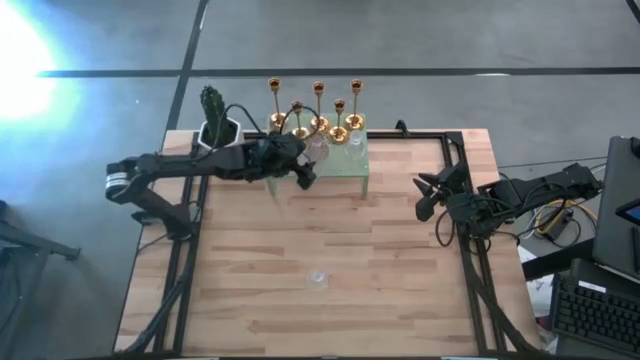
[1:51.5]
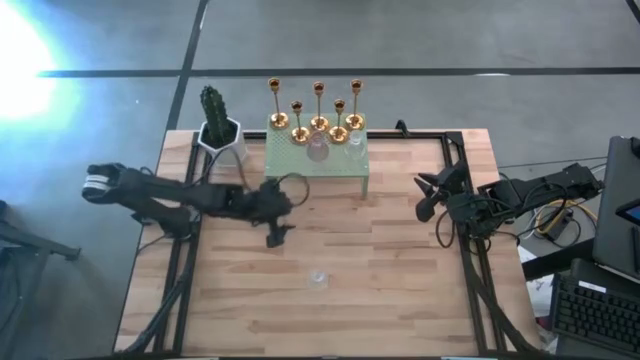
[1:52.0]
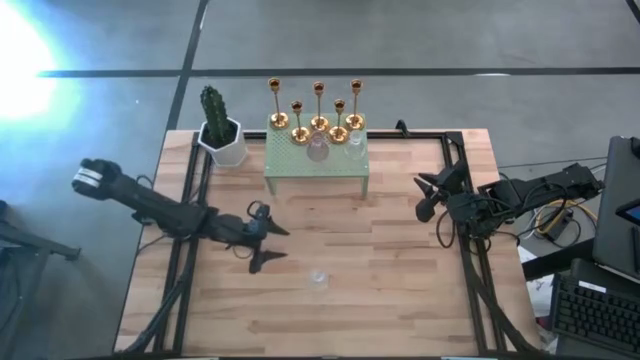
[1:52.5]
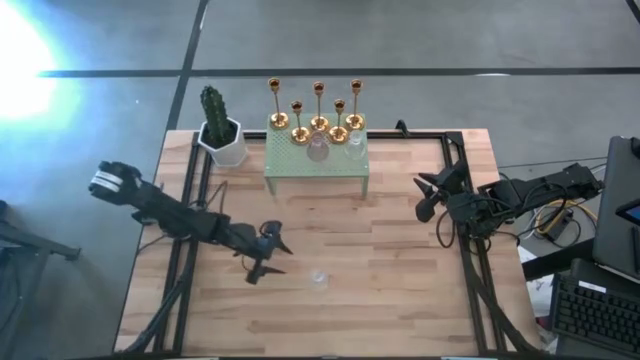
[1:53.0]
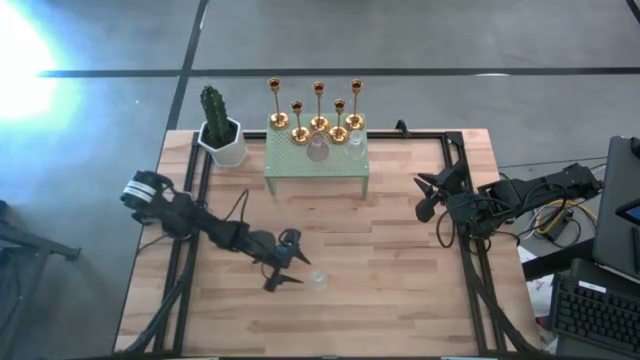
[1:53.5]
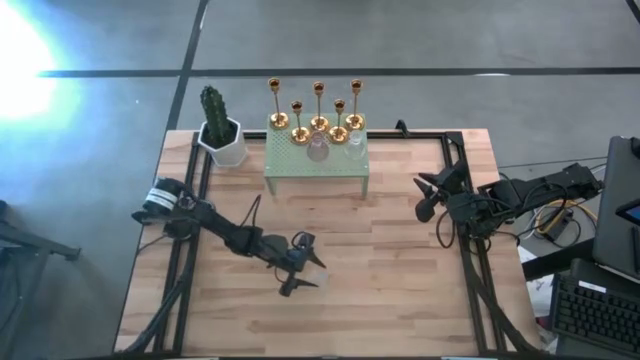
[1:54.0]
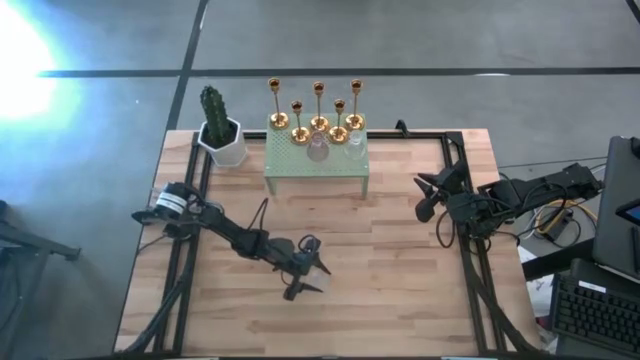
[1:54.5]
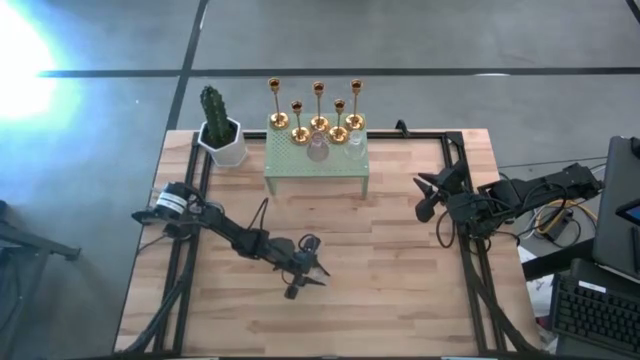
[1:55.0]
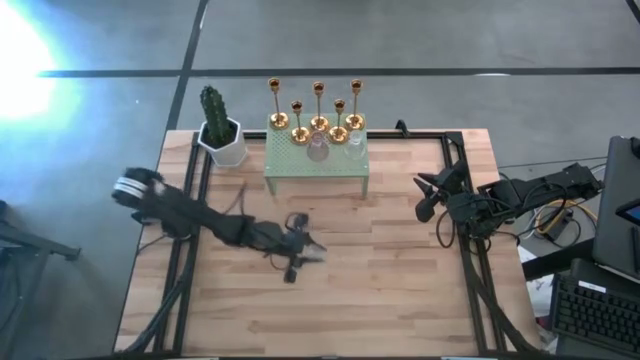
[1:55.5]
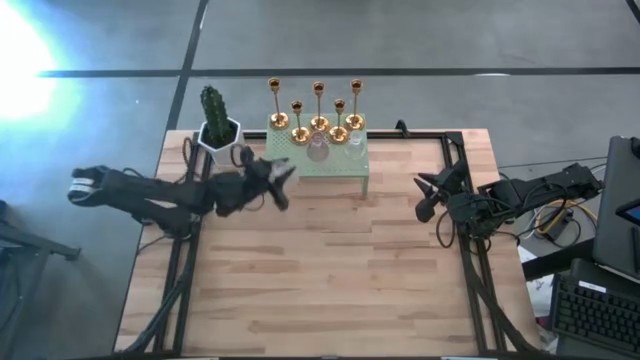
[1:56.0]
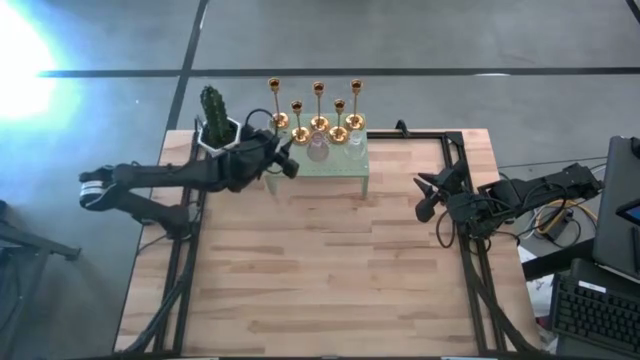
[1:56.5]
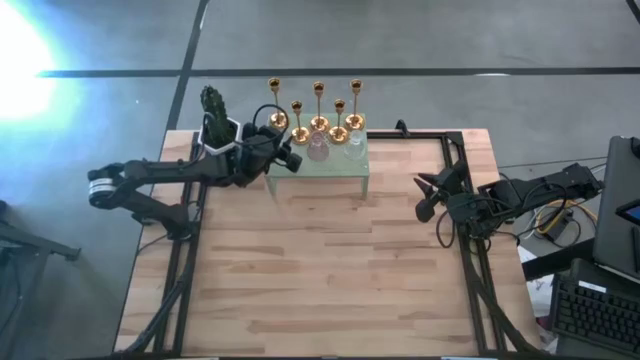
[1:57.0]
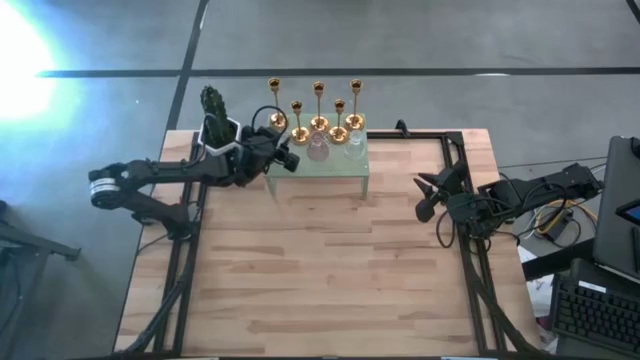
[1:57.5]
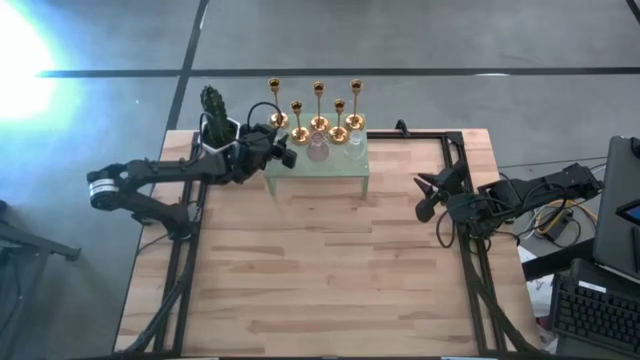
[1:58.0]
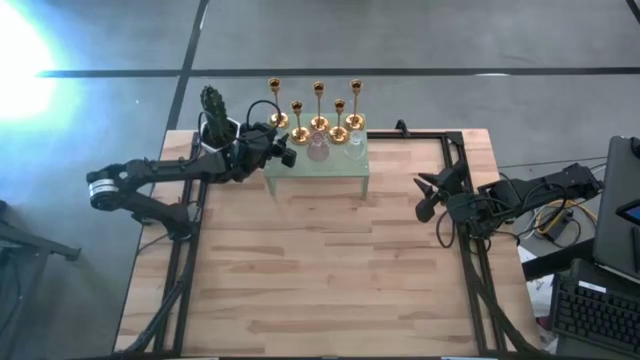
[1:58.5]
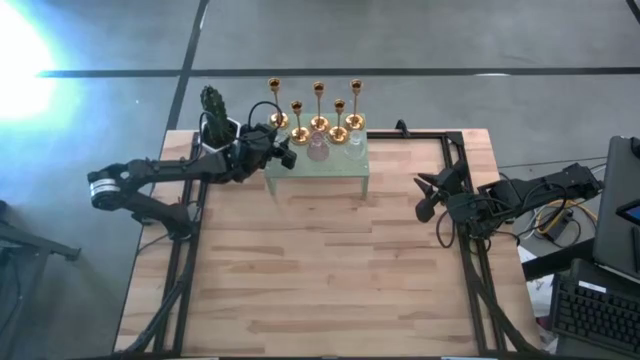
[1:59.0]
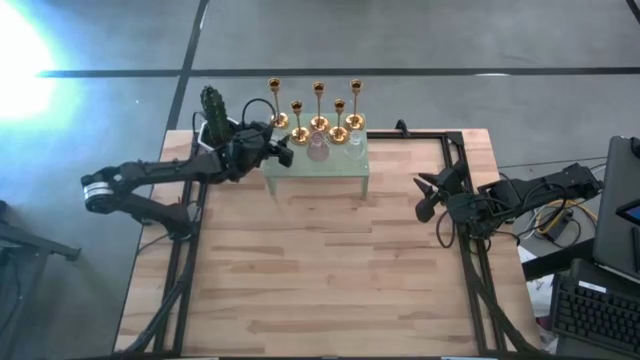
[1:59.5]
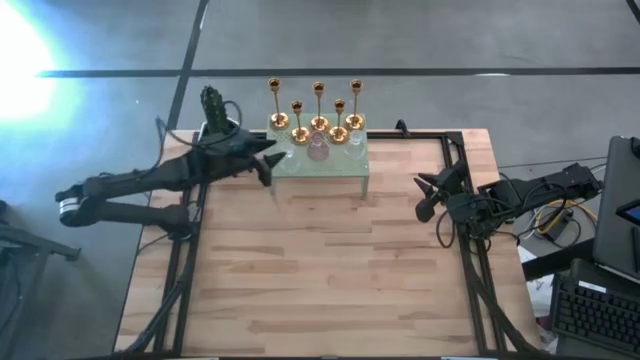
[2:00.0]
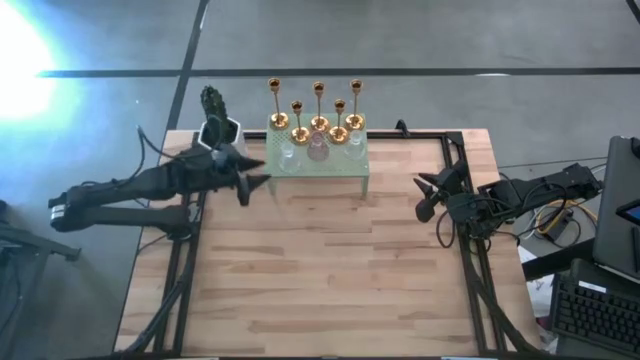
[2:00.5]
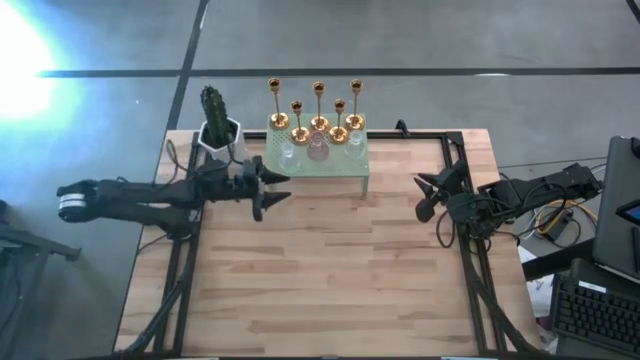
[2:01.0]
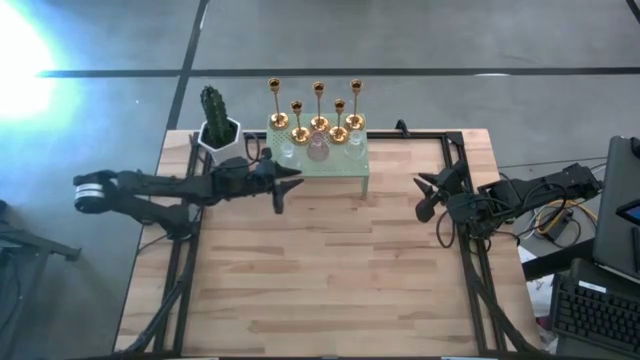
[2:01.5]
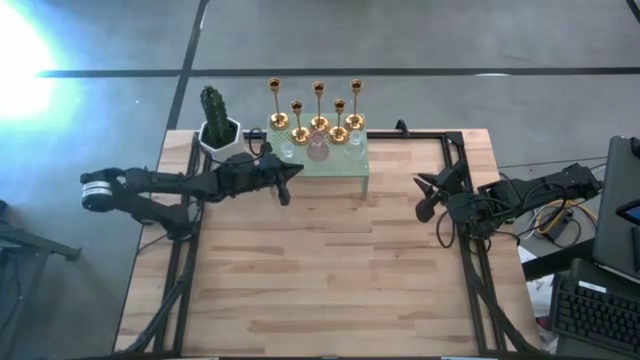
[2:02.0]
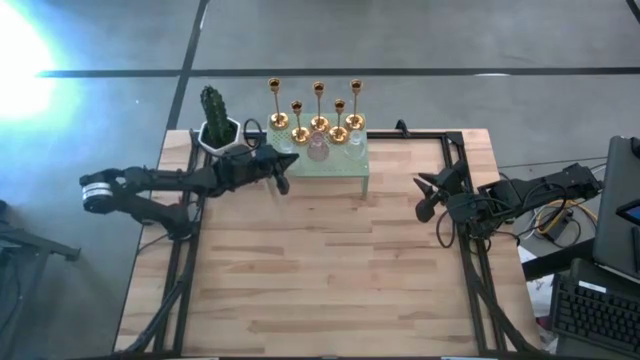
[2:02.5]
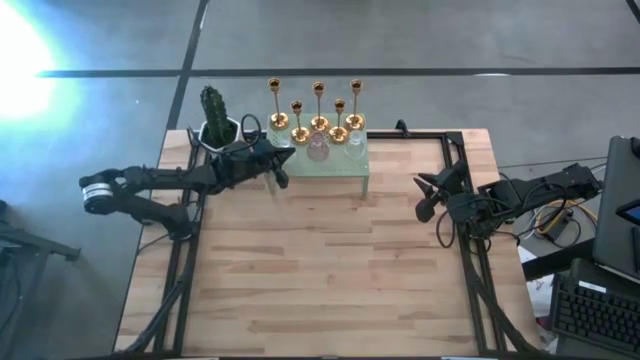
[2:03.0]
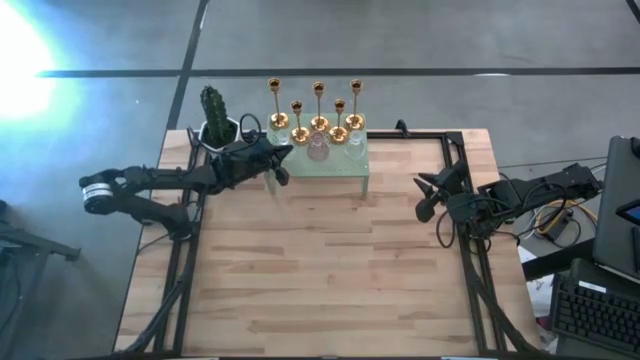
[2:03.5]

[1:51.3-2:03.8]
Task: Pick & Place candle stick holders
Put the transparent candle holder on the shelf

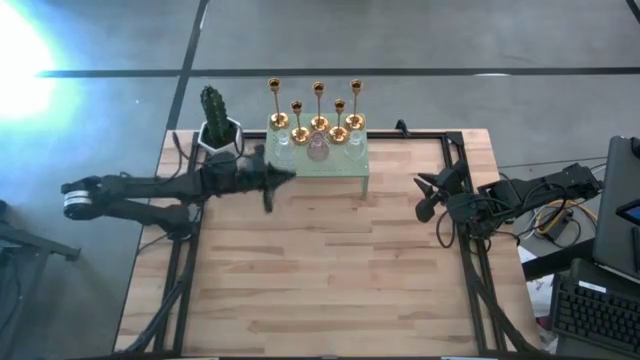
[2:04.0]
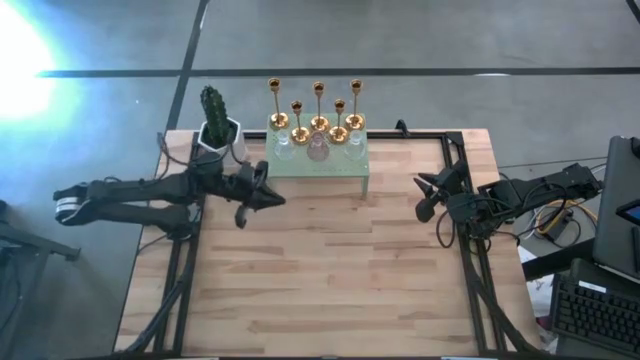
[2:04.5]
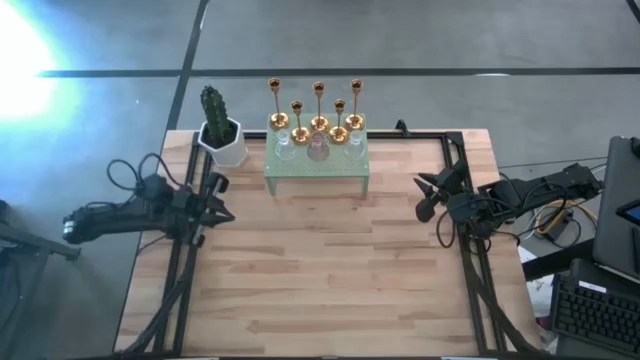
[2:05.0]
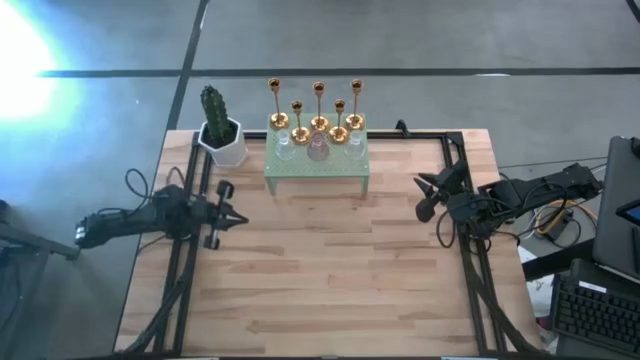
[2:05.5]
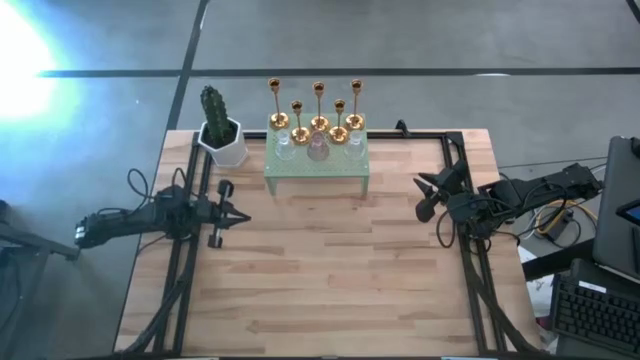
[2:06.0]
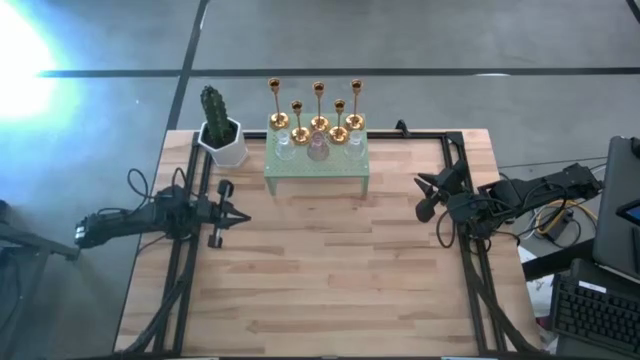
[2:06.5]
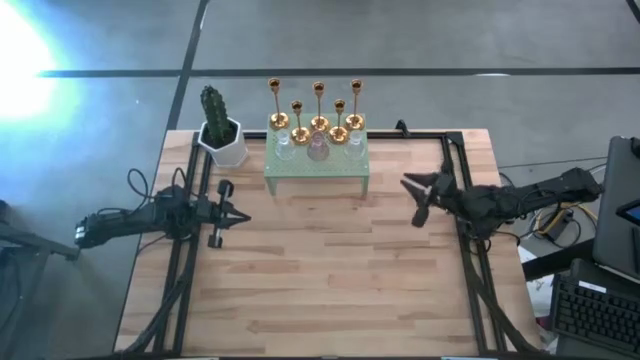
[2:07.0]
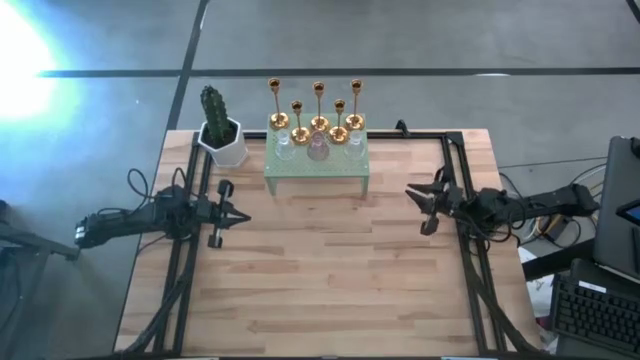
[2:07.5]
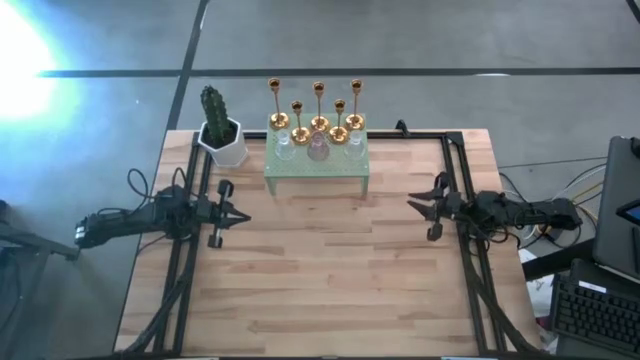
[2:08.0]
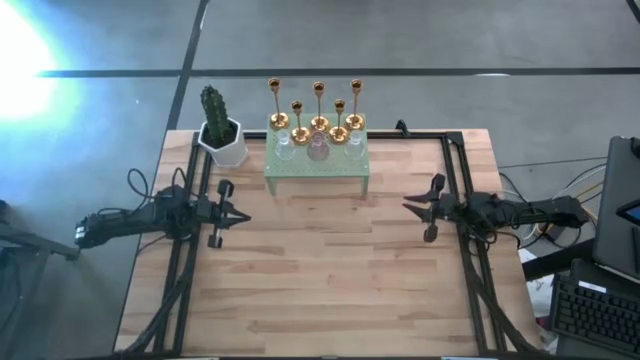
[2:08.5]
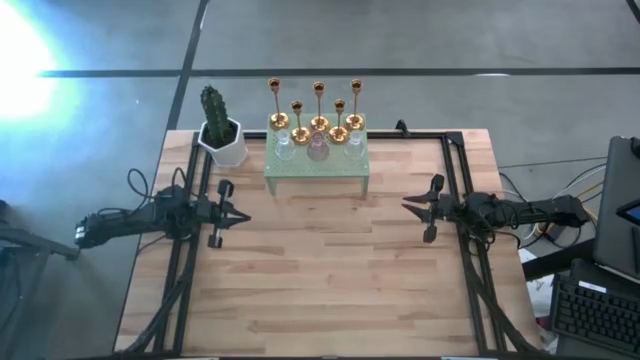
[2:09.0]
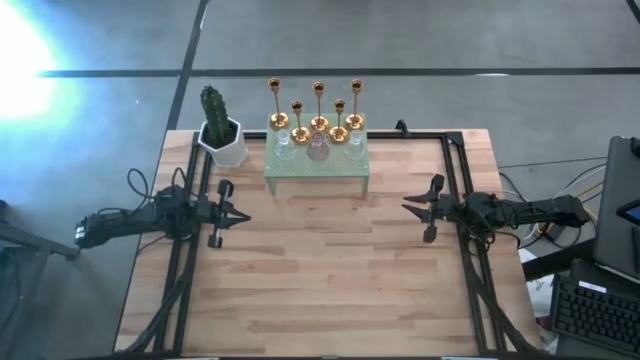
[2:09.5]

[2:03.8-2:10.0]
Return to Home Position

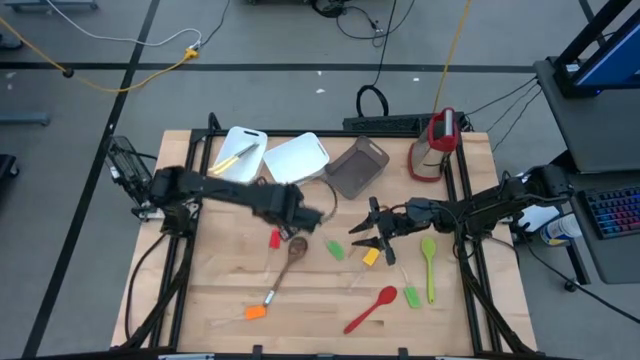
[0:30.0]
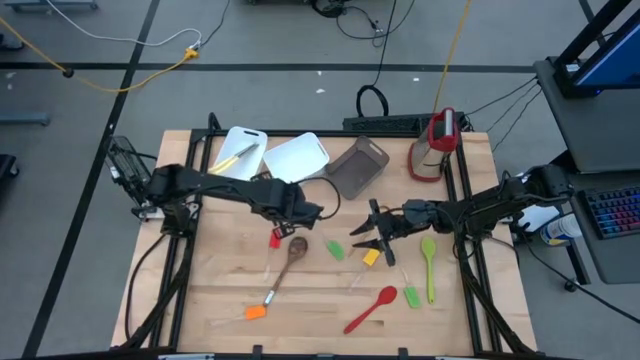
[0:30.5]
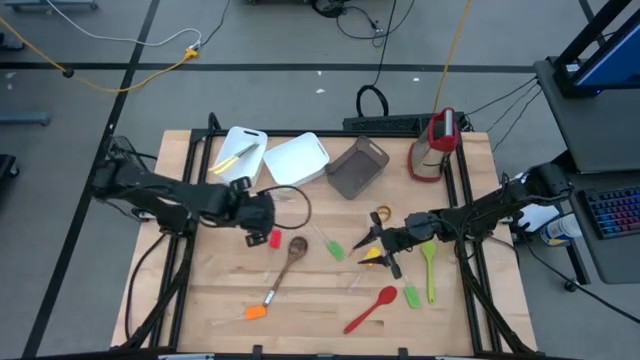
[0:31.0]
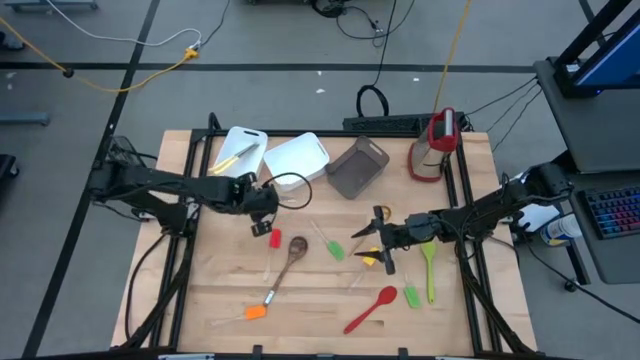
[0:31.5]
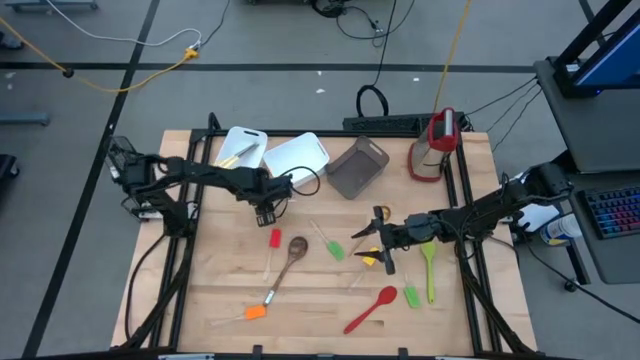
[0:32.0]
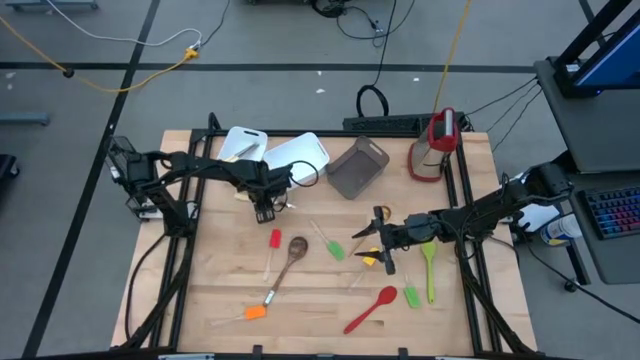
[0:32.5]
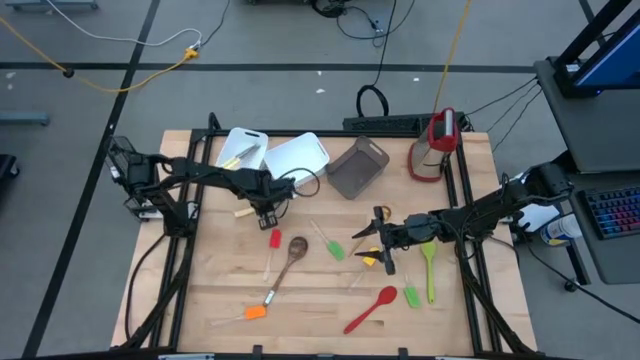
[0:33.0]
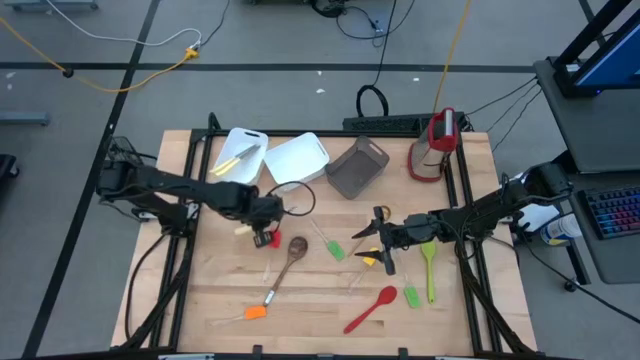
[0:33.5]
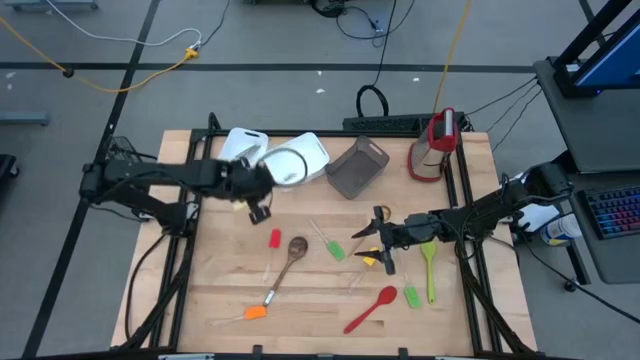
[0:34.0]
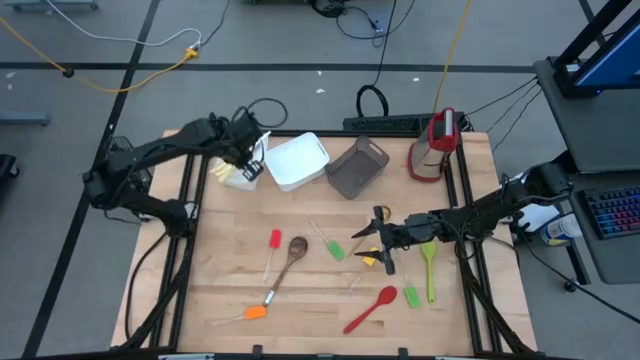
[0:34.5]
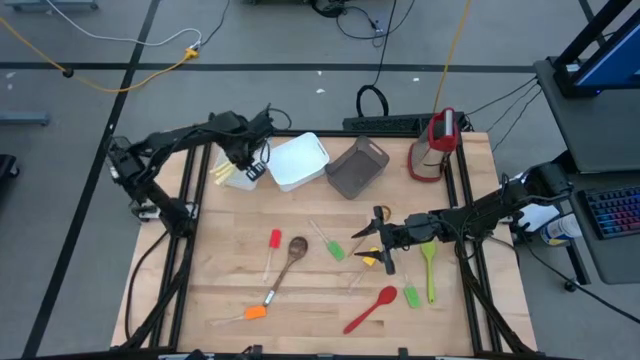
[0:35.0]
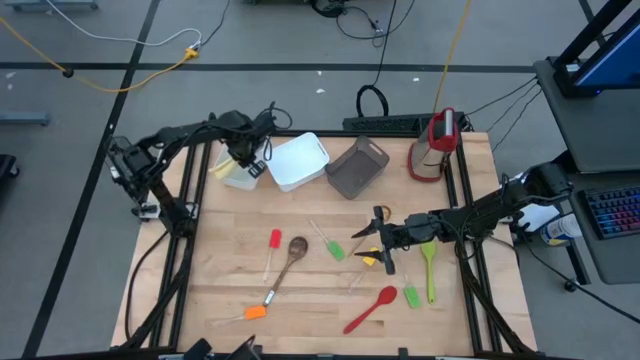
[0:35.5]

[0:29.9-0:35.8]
Task: Pick & Place Kitchen Items
Put the yellow kitchen knife into the left white bin
